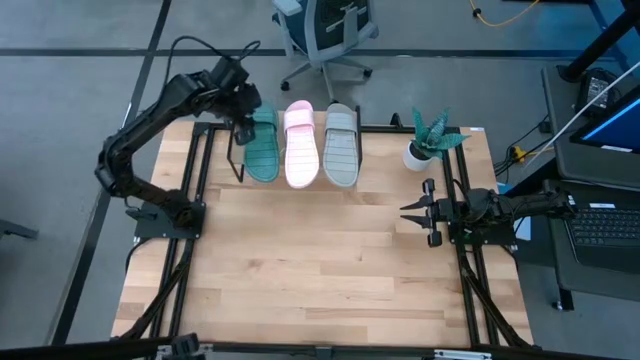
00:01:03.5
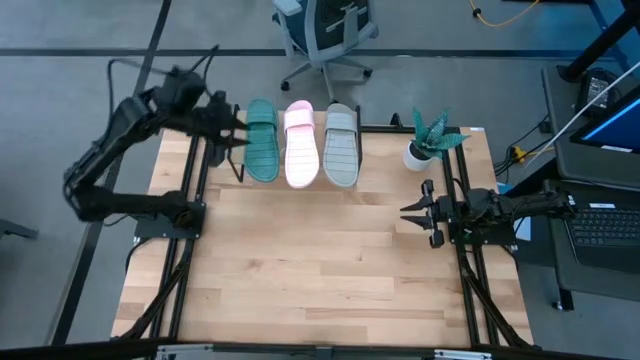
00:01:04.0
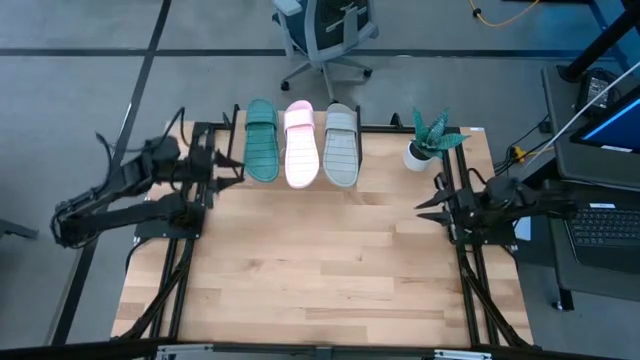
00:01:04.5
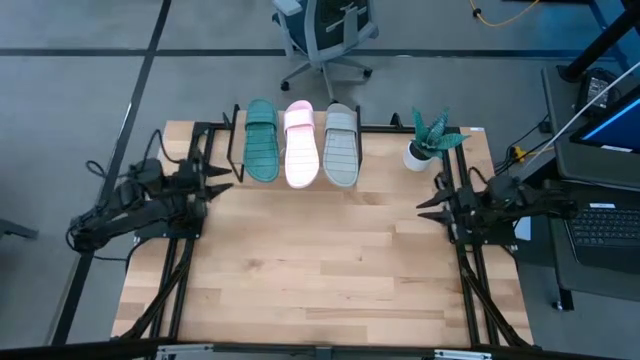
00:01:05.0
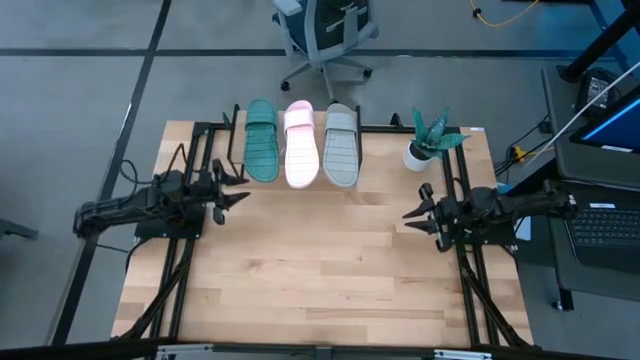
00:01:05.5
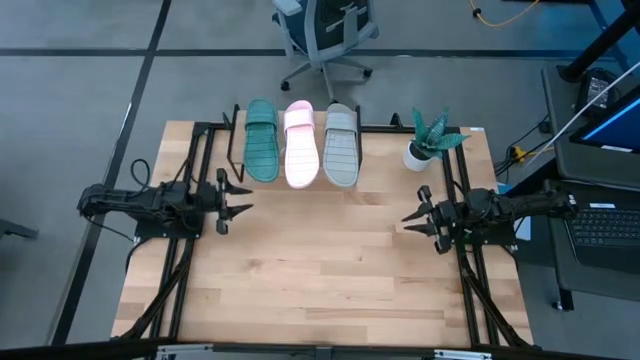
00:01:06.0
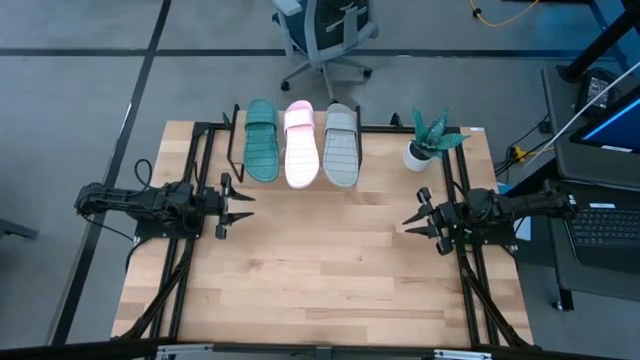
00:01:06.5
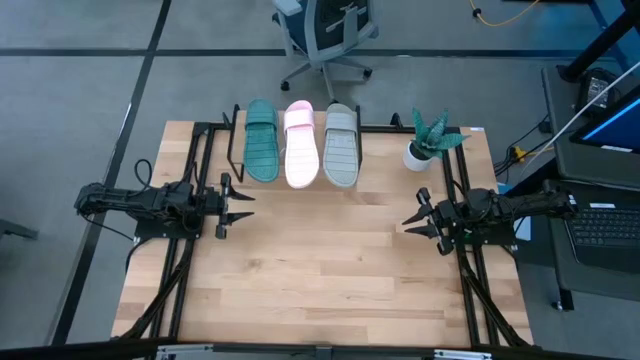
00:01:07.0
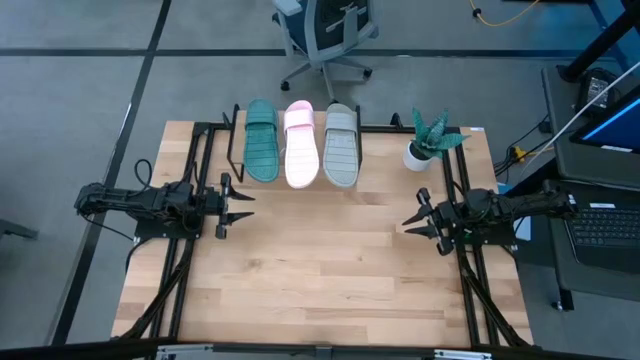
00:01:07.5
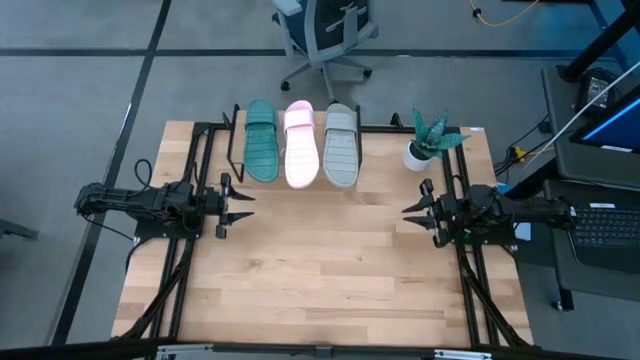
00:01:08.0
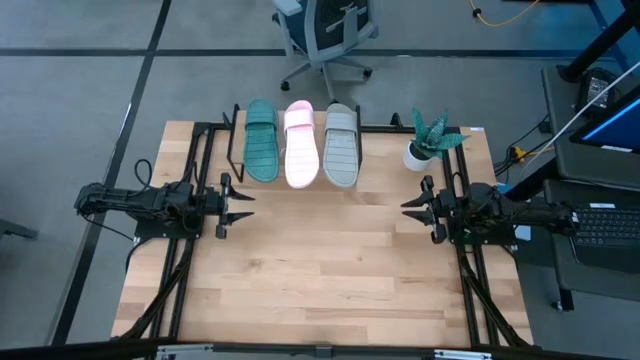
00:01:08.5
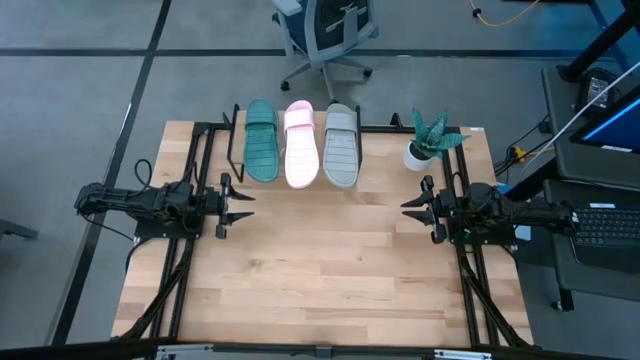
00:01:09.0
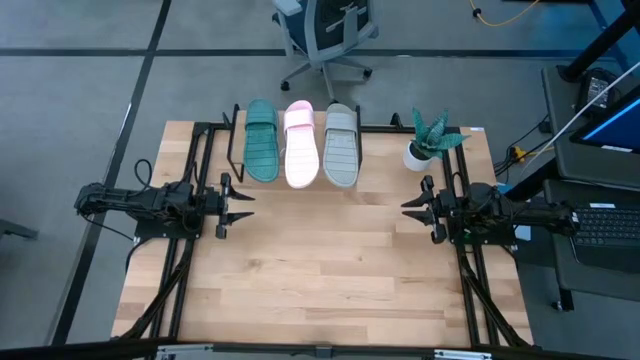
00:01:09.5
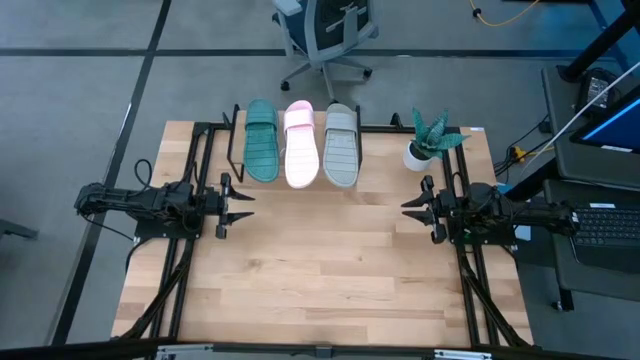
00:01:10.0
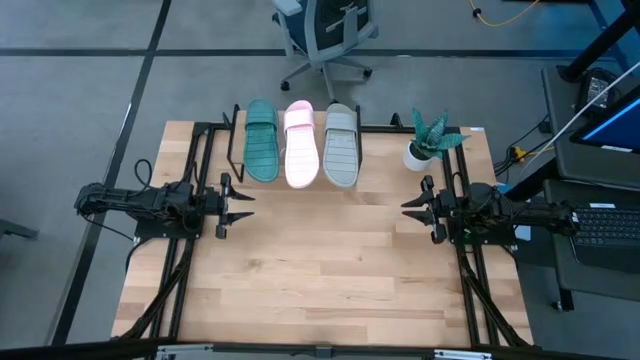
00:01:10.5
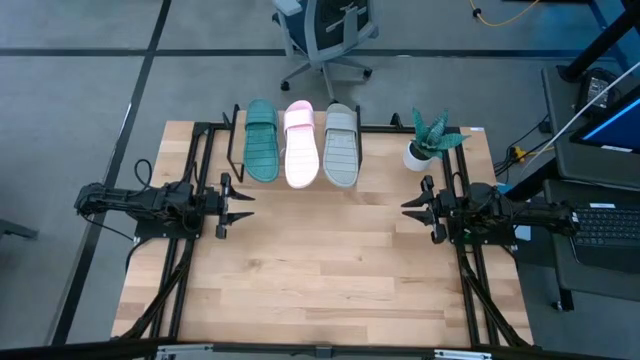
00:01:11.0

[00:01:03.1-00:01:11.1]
Task: Pick and place slippers onto the shelf
Return to Home Position

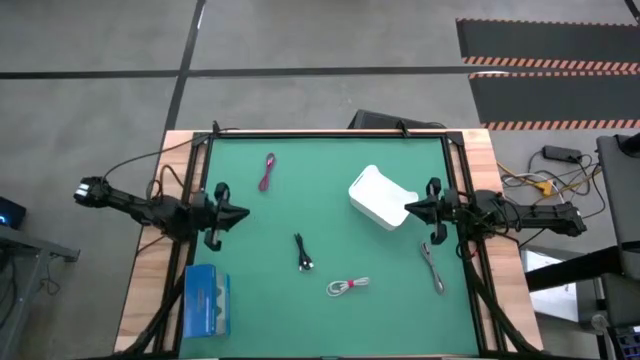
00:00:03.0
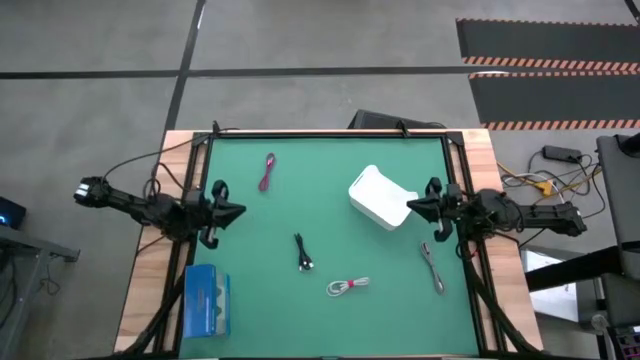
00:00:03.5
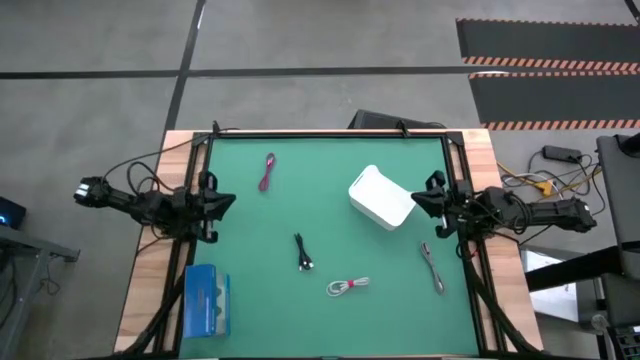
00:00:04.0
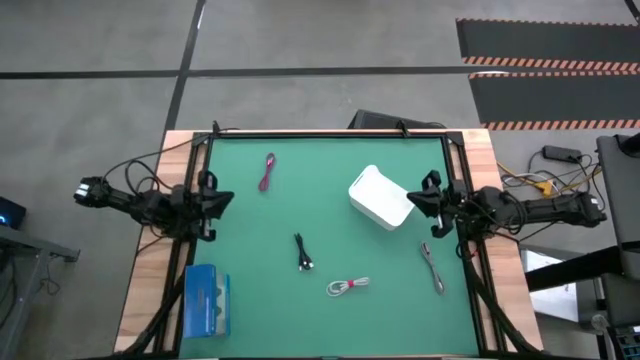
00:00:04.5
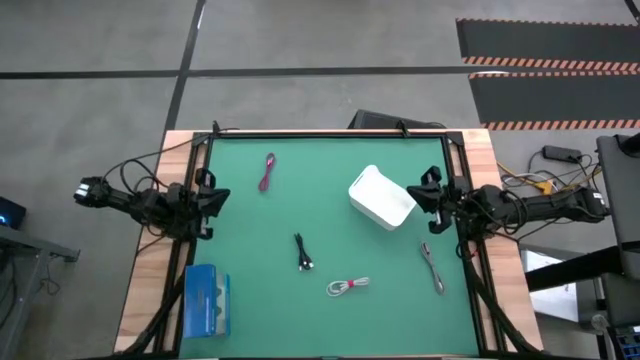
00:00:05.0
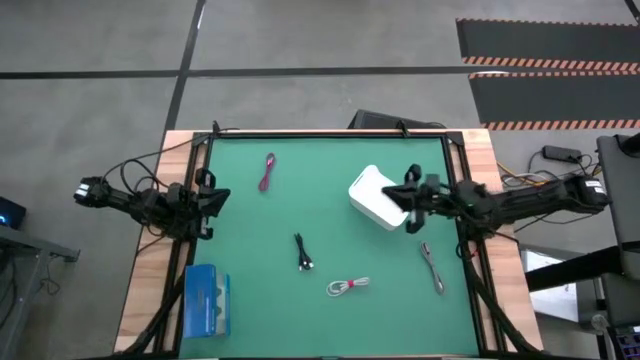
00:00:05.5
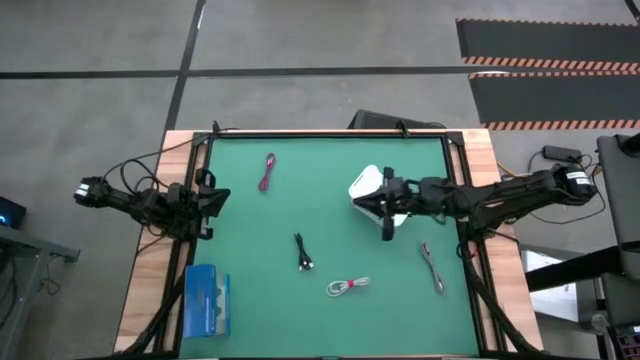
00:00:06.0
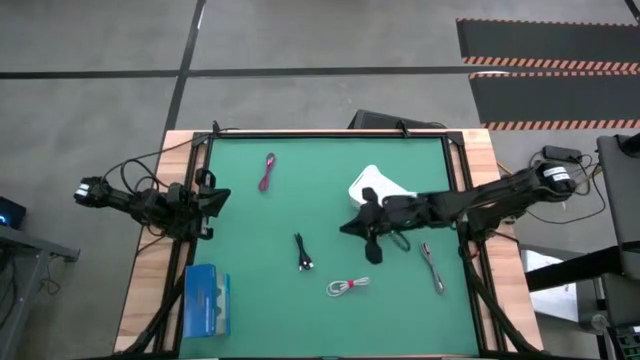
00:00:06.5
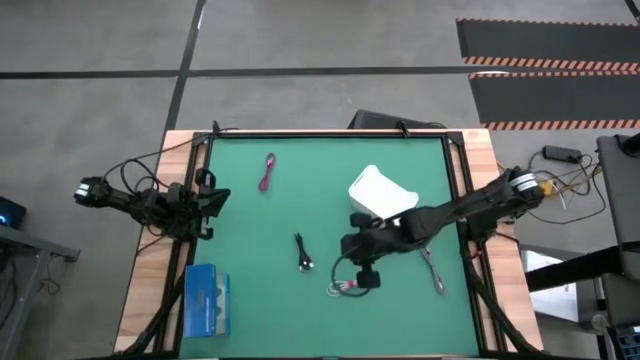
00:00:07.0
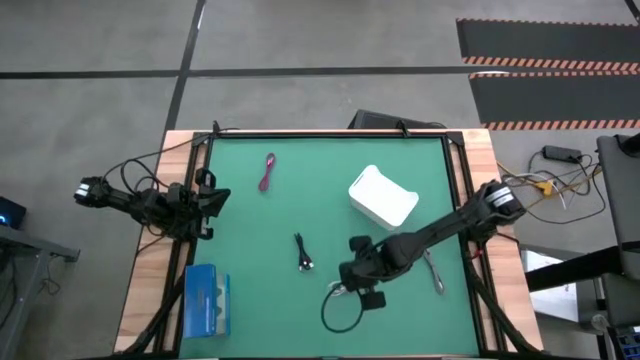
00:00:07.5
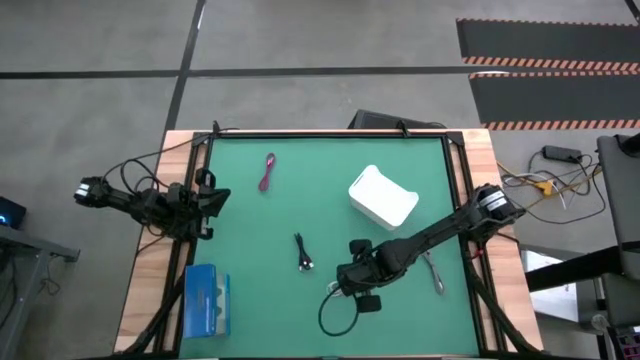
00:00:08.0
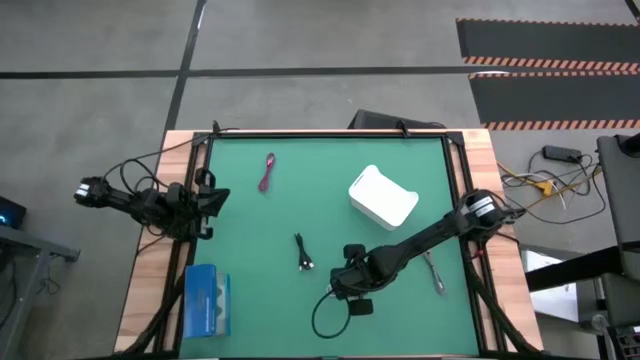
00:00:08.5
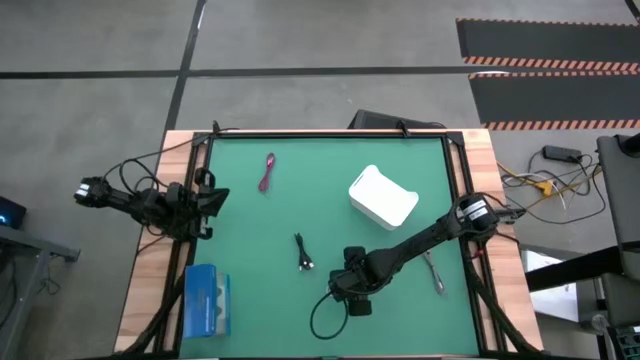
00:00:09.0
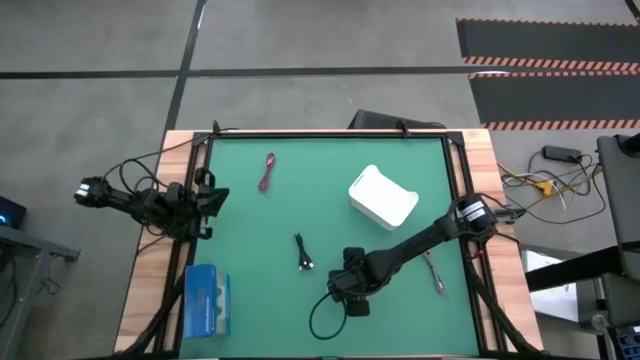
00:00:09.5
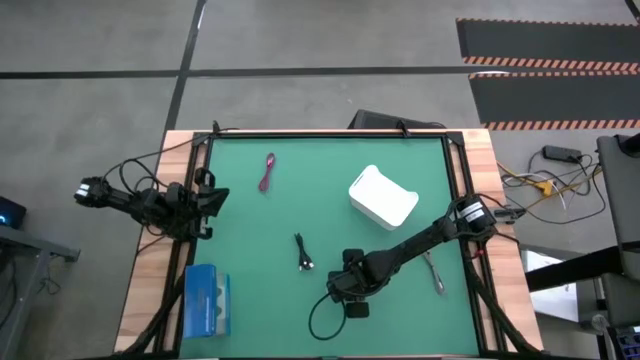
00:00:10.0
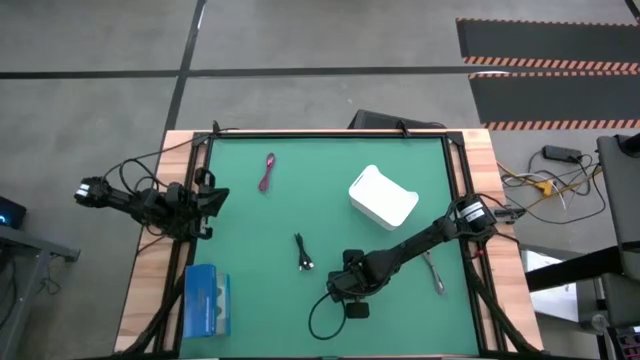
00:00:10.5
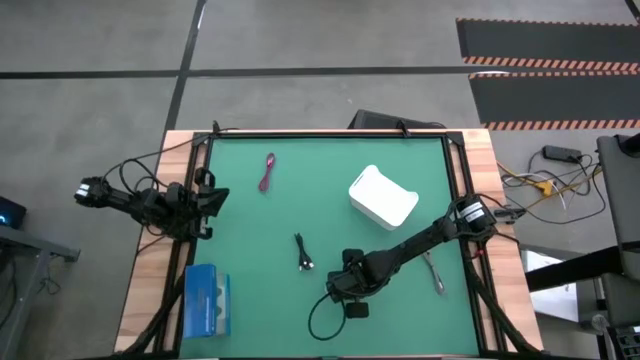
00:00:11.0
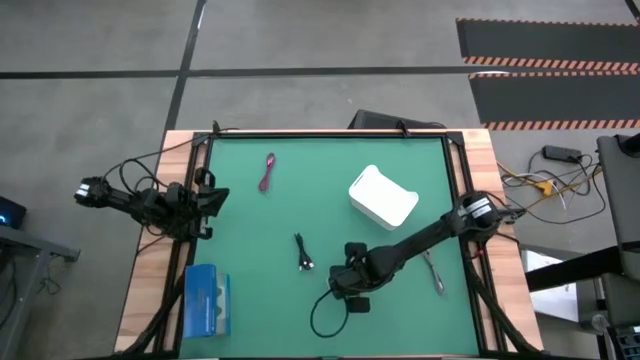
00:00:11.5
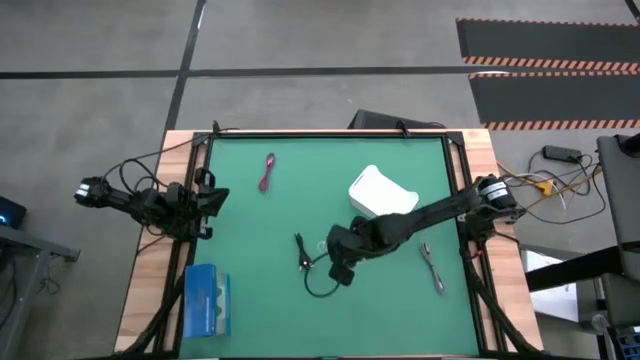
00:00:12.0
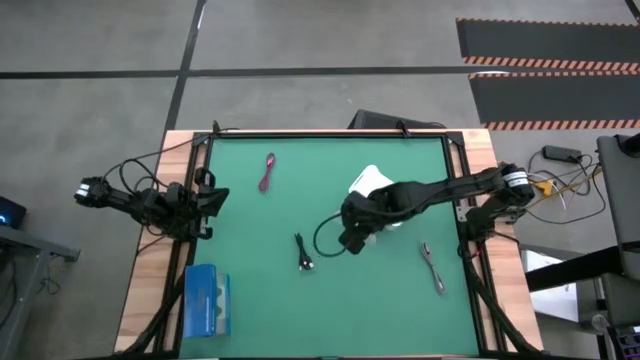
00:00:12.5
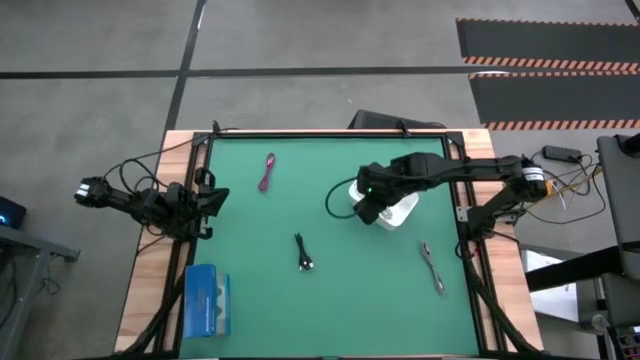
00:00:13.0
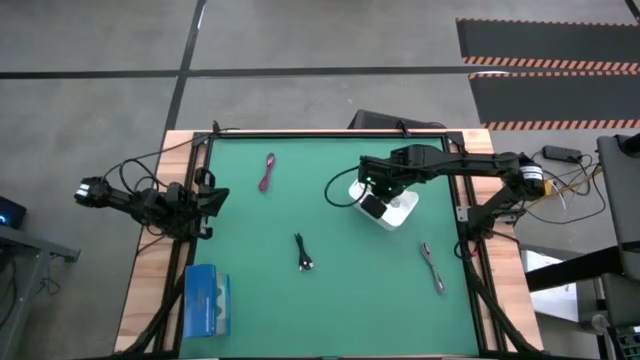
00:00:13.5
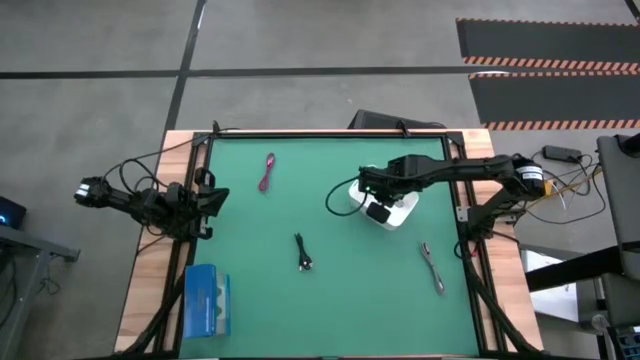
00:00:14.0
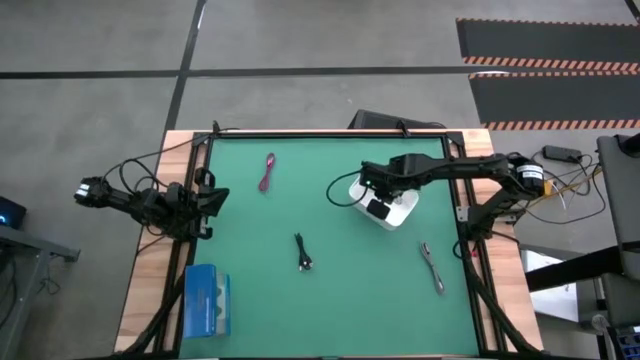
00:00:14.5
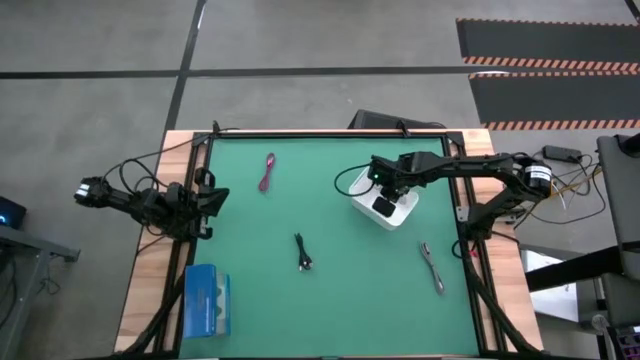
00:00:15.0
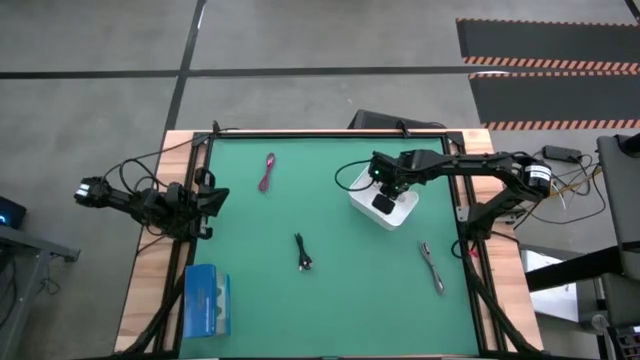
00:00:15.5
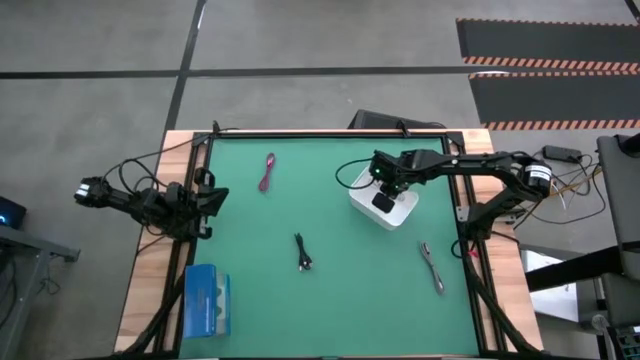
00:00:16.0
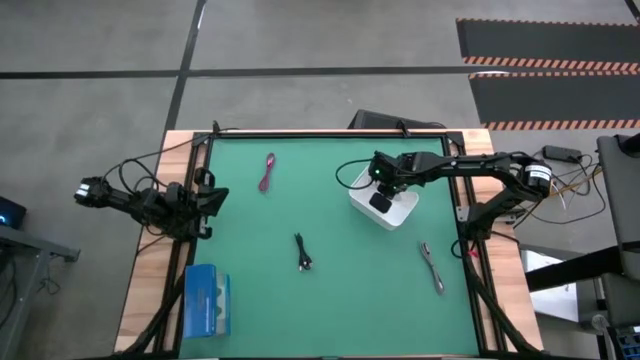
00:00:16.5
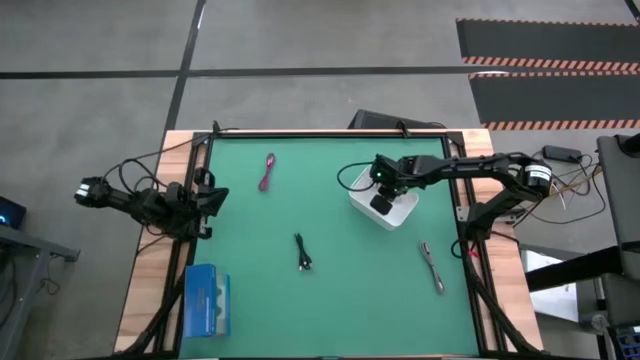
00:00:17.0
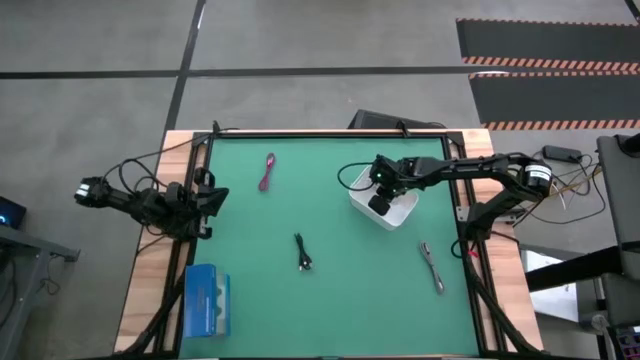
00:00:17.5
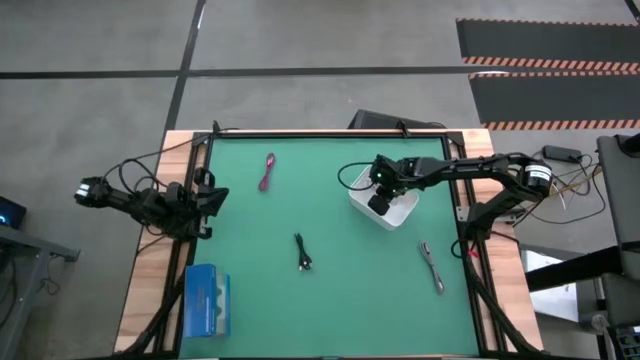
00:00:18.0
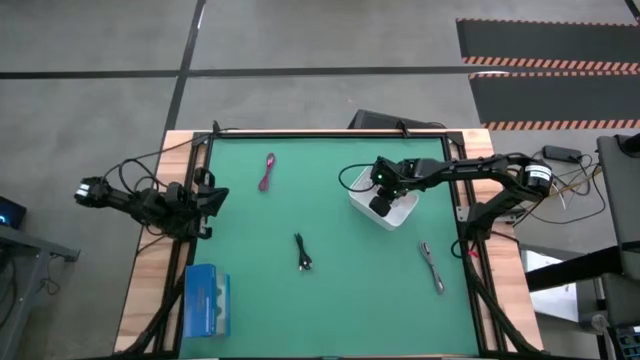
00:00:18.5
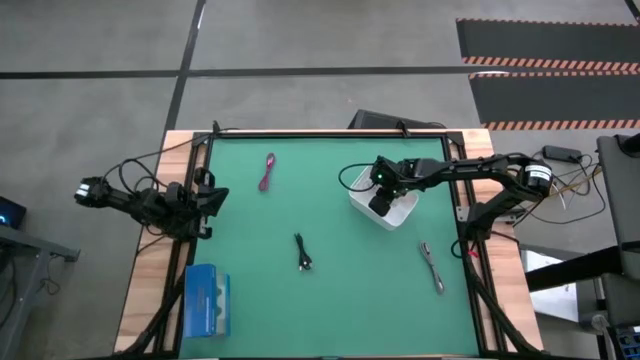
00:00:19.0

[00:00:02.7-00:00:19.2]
Task: Pick and place USB-C Cables
Put the white charger cable into the white bin
